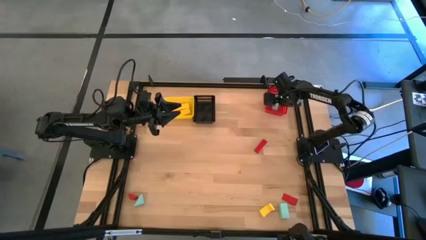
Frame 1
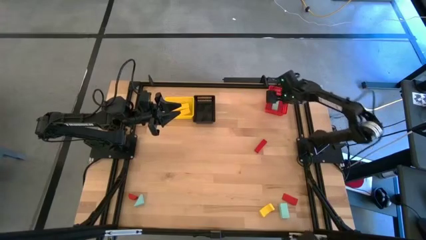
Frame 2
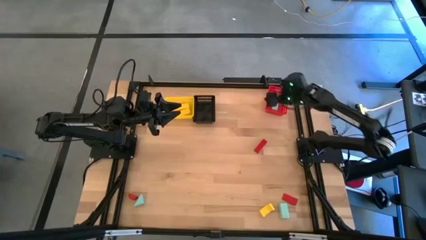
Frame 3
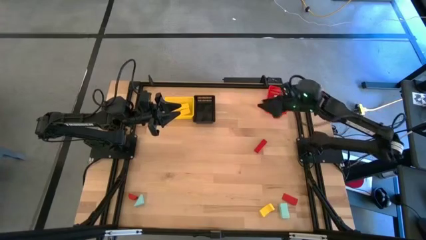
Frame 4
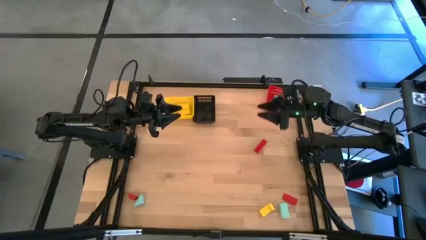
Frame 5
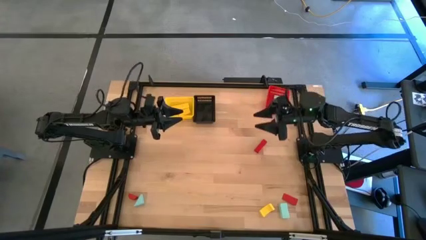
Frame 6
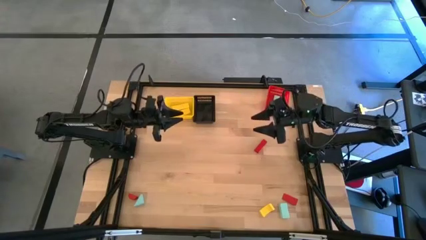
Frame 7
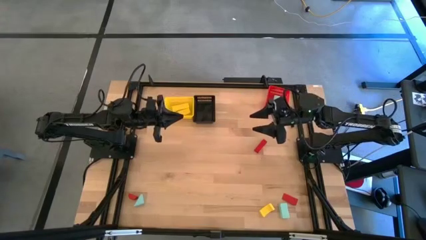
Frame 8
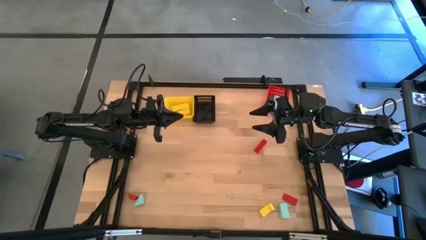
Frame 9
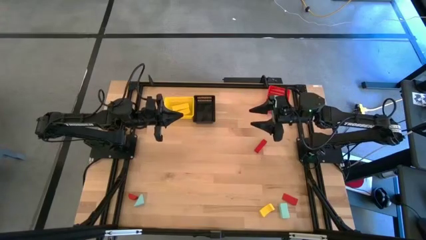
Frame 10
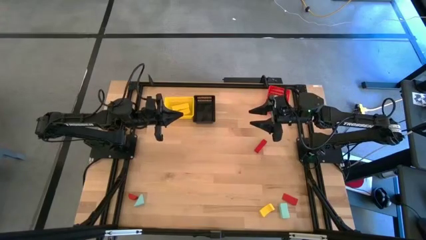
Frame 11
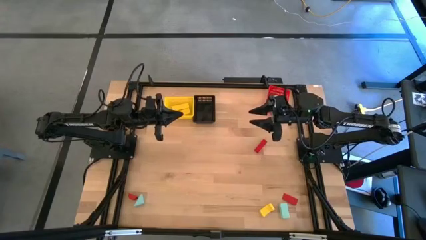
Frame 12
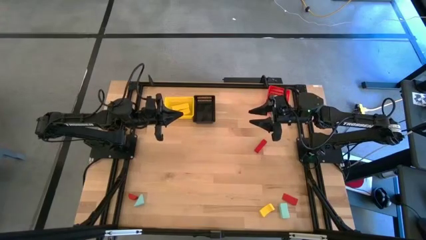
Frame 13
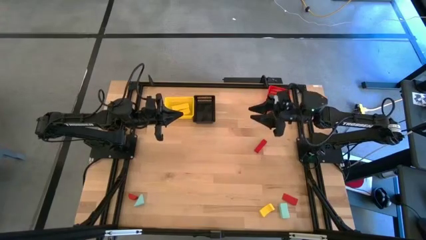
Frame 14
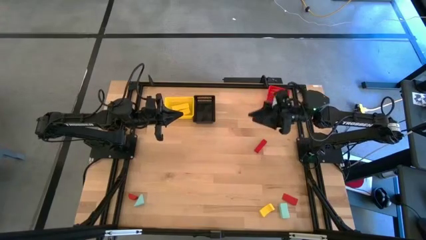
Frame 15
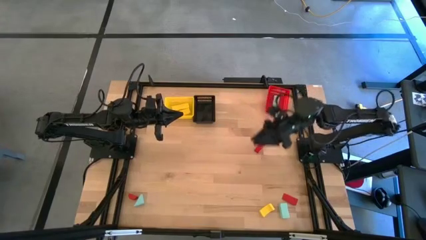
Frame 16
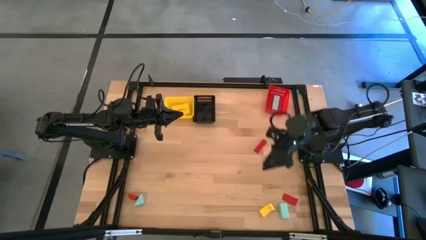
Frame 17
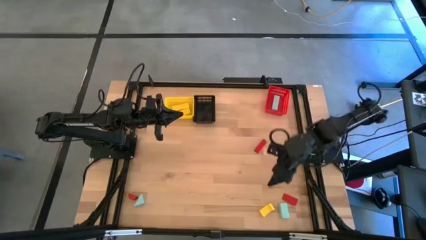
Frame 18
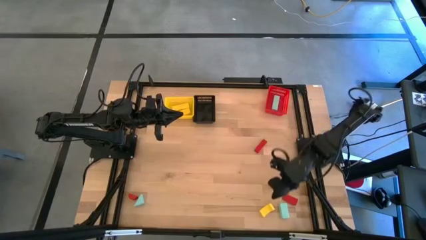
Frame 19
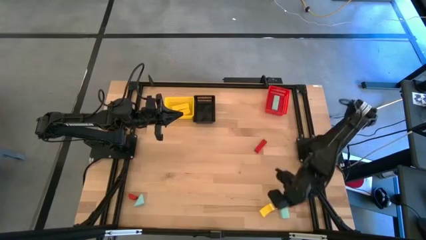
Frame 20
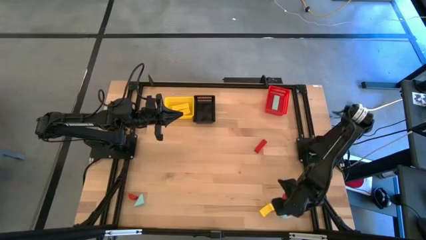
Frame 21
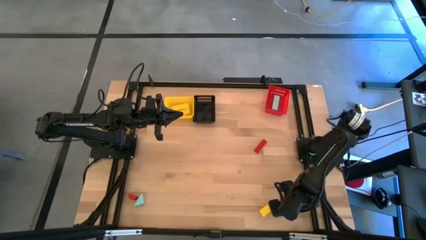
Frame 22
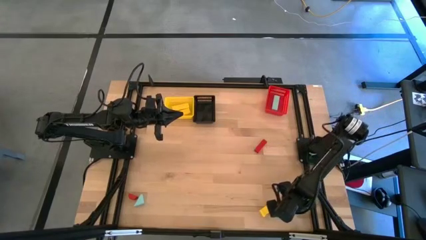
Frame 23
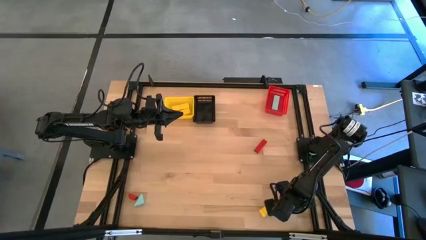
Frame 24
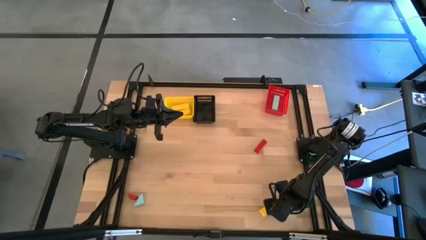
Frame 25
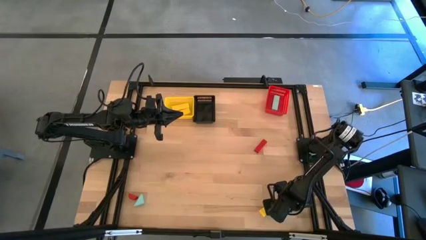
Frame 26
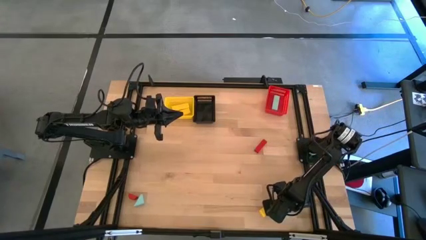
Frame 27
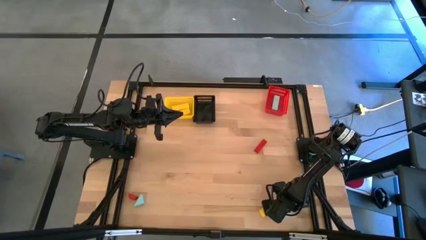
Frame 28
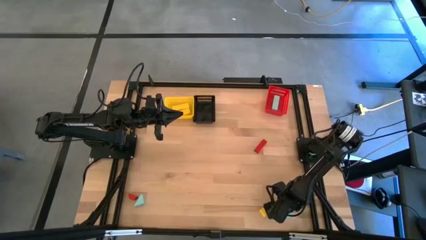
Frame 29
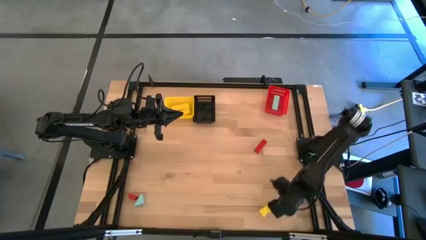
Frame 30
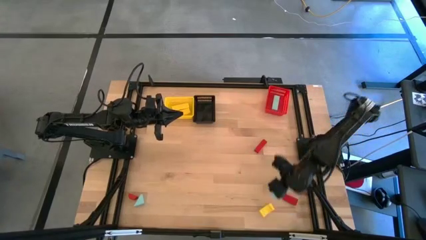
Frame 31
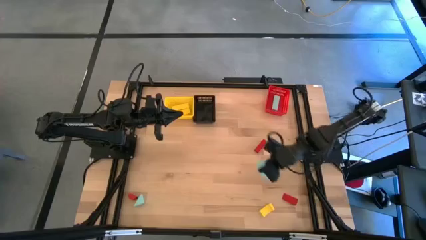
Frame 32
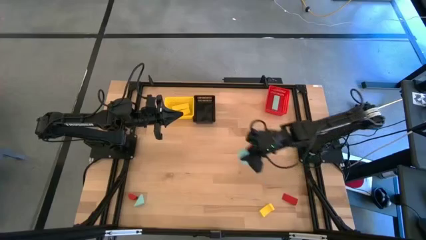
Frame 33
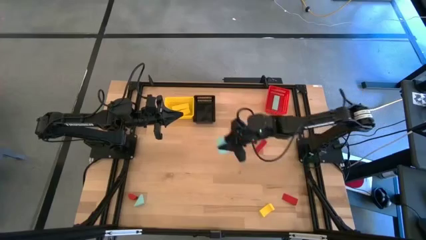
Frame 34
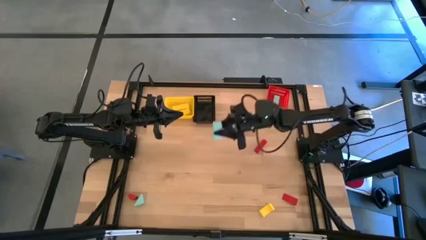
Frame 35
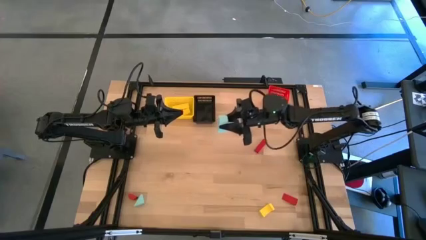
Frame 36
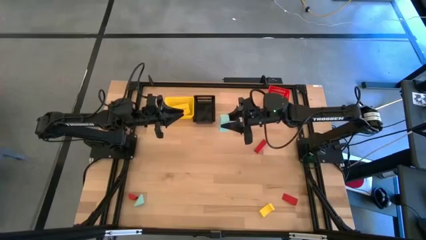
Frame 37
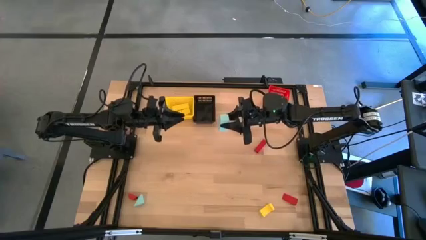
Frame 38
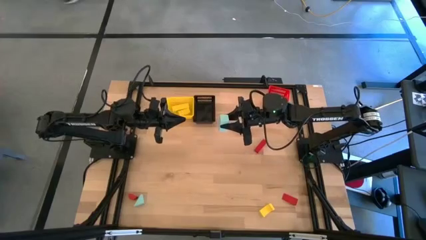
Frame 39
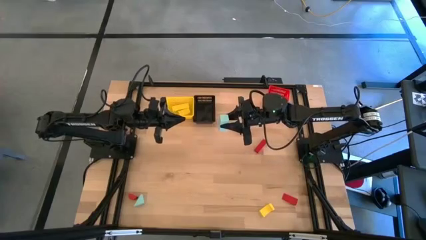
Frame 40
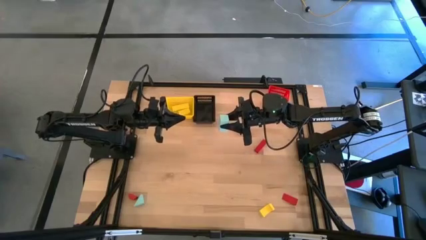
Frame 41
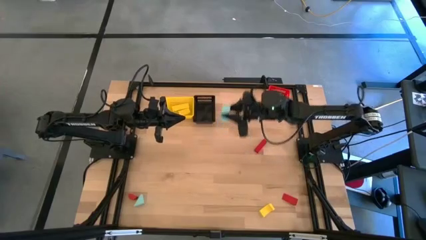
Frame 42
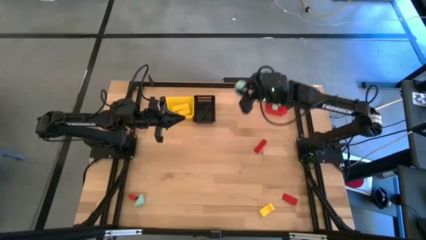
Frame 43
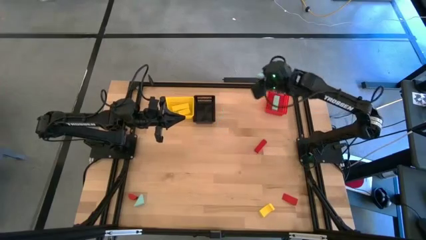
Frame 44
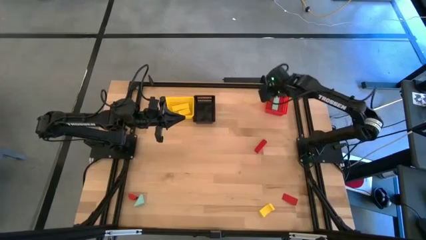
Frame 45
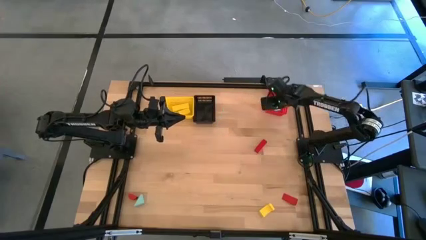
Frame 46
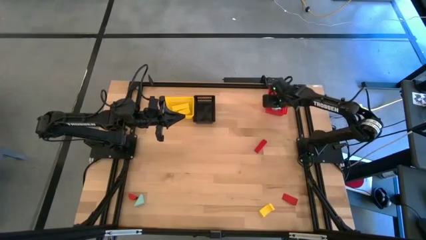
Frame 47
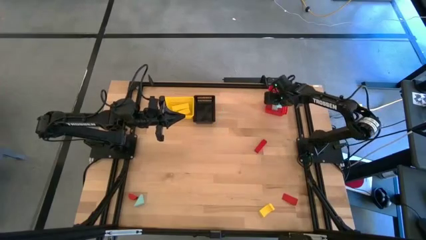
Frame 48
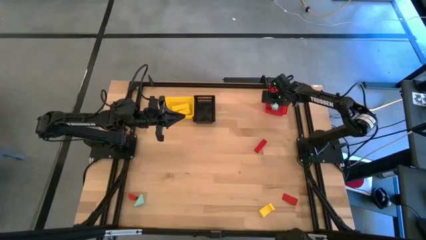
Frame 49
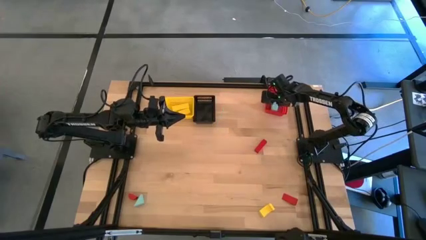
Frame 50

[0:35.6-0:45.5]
Task: Sort & place blocks by color
Put the right blue block into the red bin
